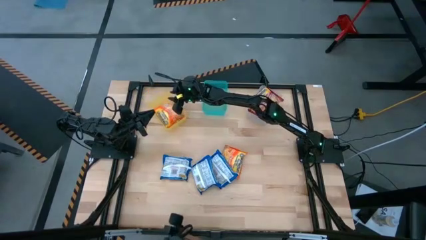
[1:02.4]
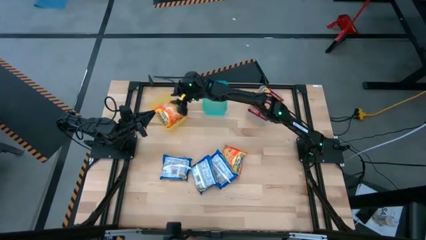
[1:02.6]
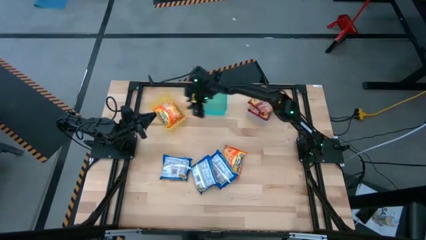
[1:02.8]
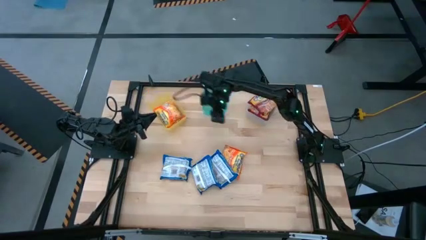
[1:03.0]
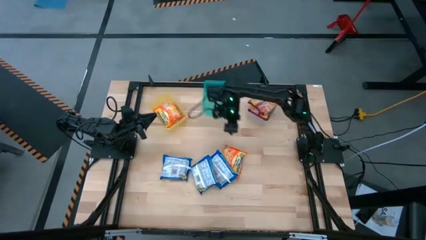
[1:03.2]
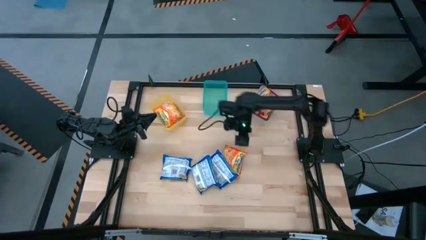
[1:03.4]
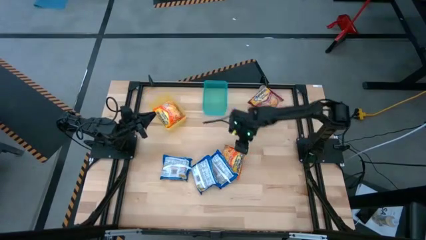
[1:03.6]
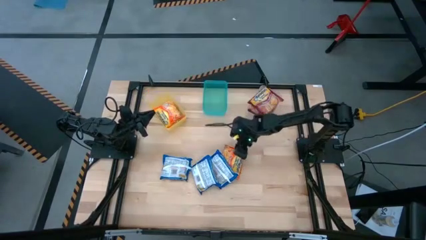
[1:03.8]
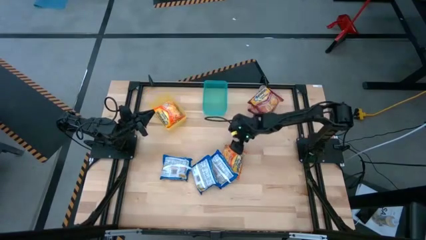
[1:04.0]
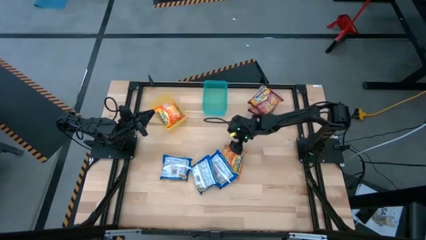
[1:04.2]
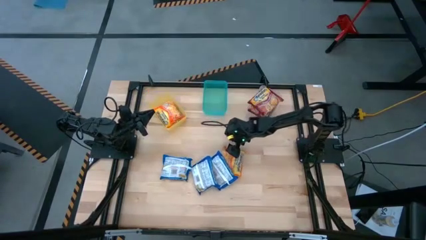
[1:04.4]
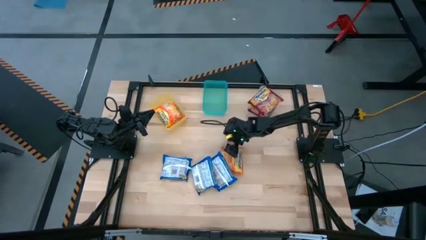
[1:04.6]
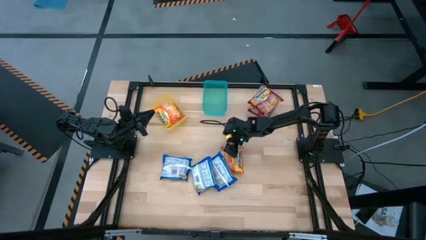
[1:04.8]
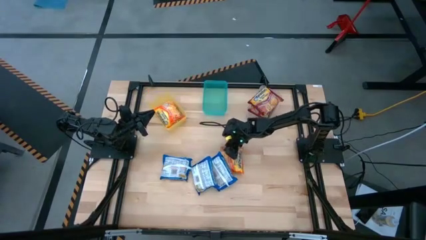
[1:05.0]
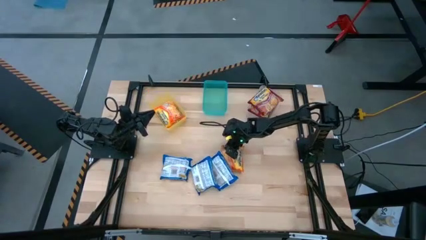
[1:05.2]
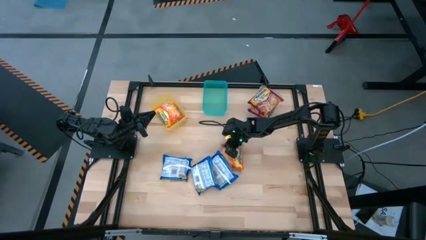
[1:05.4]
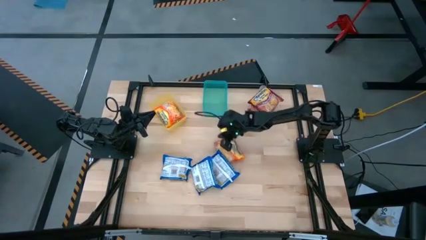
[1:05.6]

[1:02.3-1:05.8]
Task: Sort Maruchan noodles
Put the orange noodle pack into the yellow bin

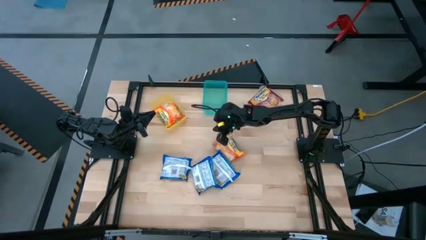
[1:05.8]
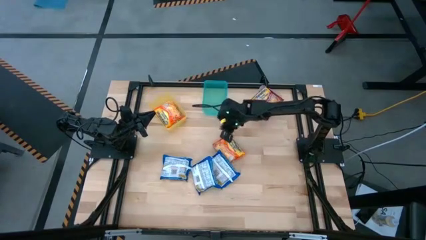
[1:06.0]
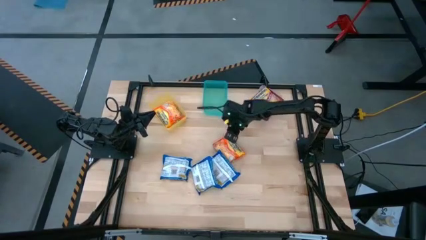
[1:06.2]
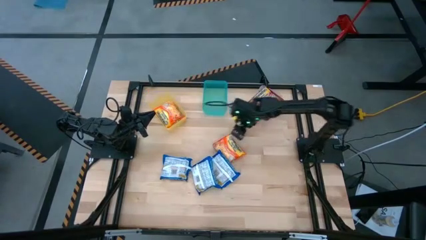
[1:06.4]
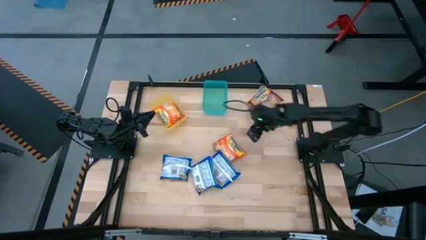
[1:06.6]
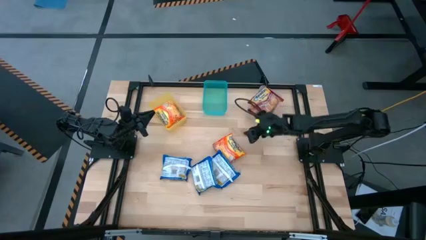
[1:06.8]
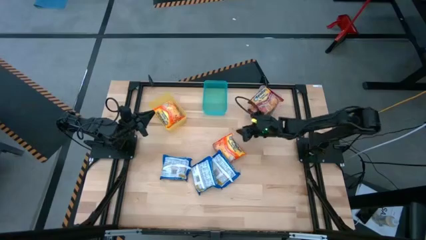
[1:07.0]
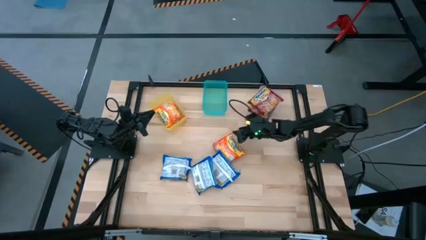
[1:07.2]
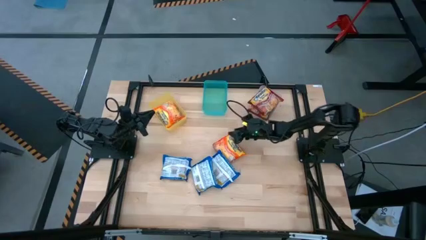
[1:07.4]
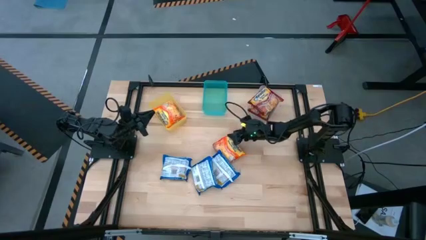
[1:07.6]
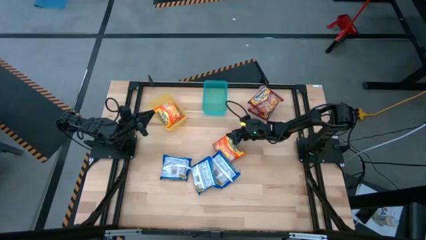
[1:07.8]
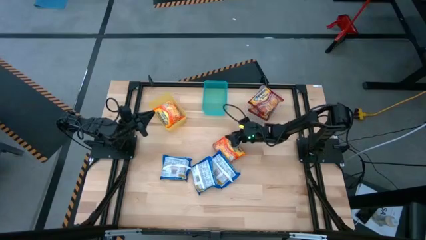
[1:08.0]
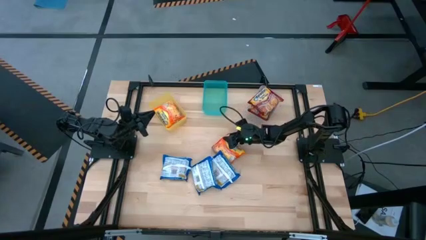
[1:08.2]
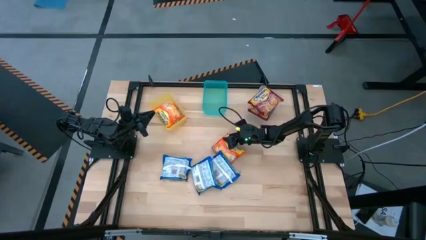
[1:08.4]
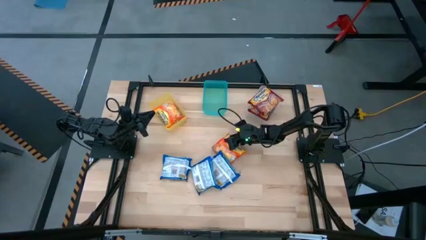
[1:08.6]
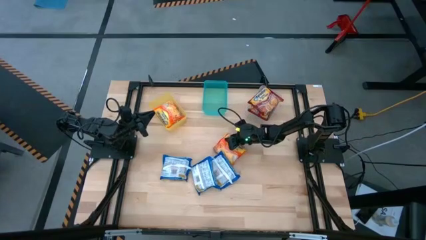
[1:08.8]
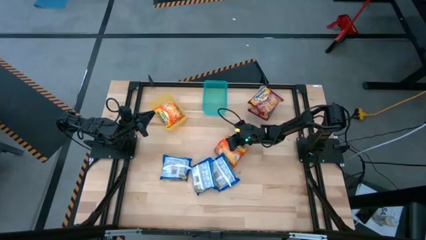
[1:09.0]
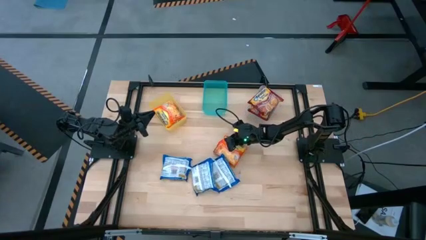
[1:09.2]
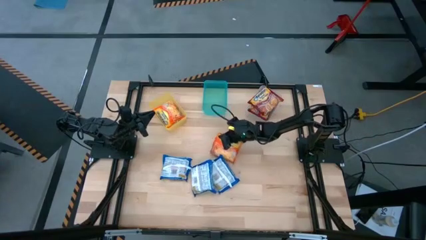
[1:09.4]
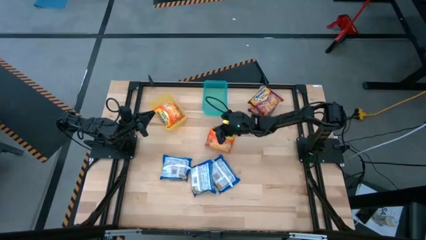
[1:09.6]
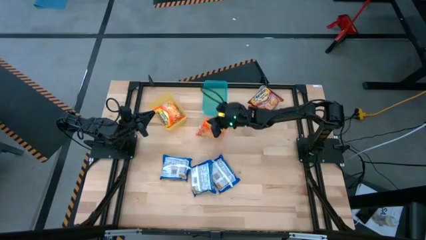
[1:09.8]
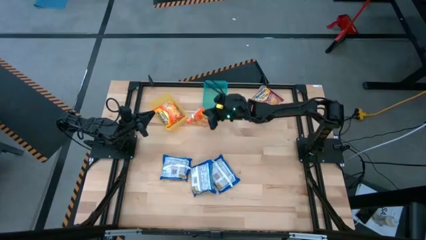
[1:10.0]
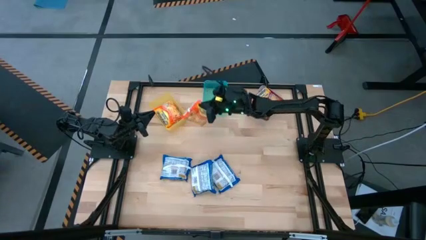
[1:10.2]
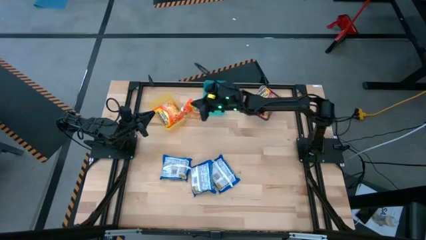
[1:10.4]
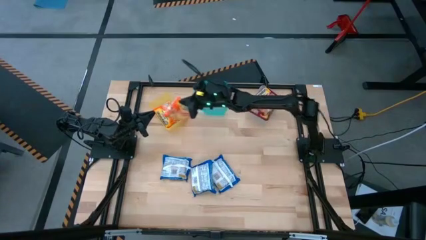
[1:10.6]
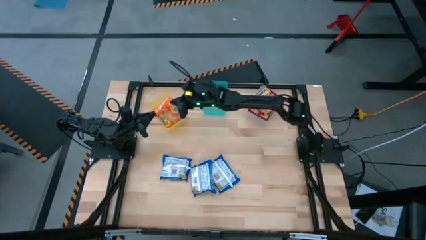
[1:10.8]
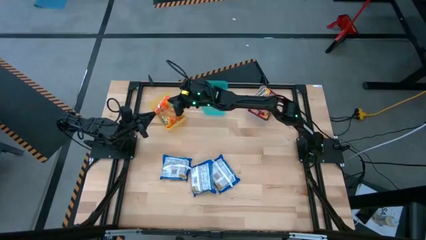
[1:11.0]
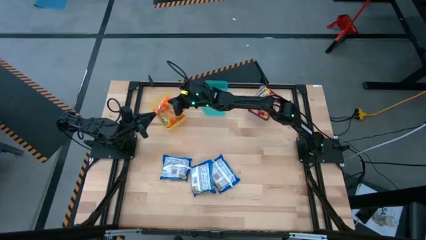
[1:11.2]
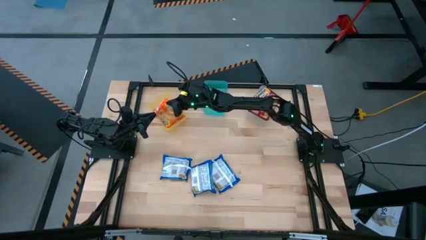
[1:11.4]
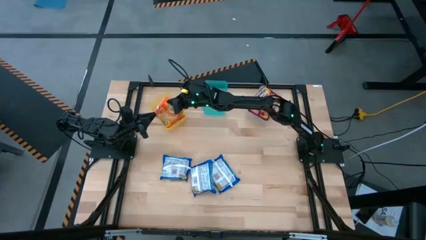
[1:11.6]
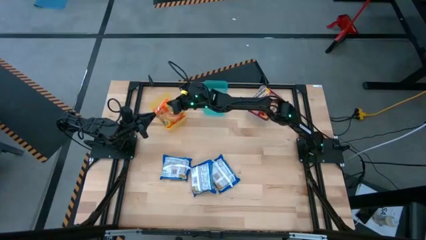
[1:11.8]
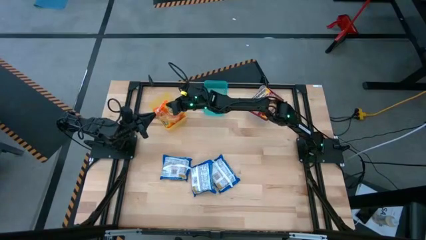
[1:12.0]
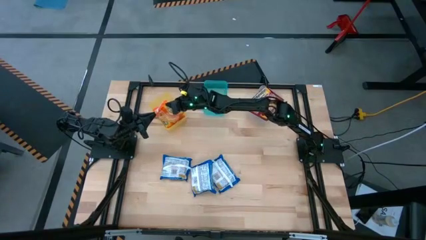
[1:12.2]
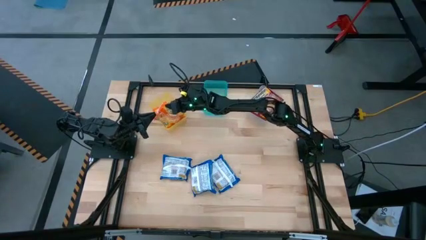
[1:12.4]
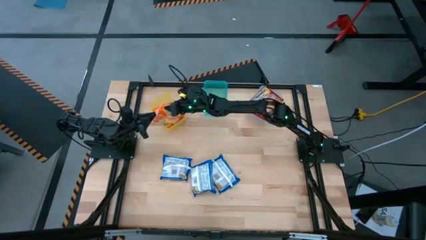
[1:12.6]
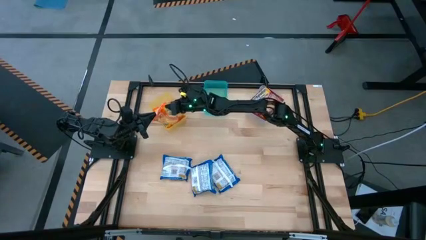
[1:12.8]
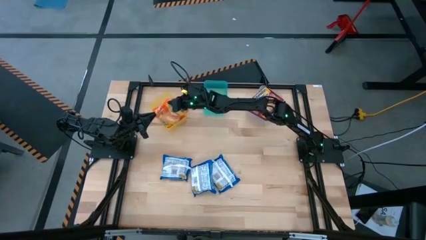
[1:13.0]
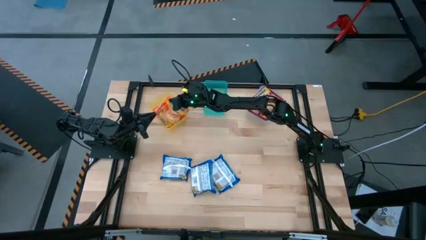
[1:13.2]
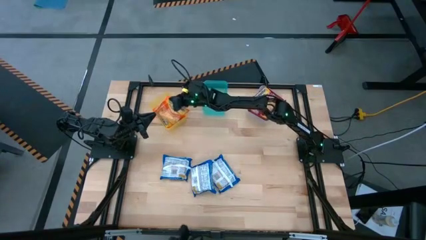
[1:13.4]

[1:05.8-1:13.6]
Put the orange noodle pack into the yellow bin

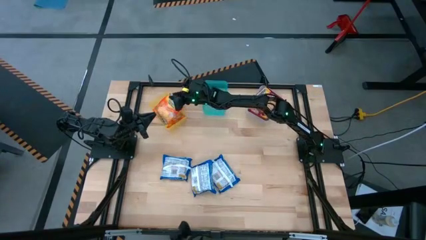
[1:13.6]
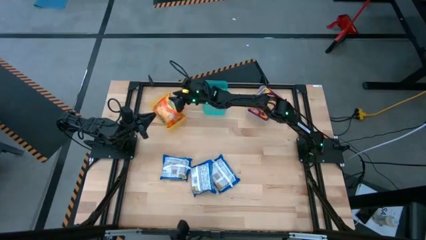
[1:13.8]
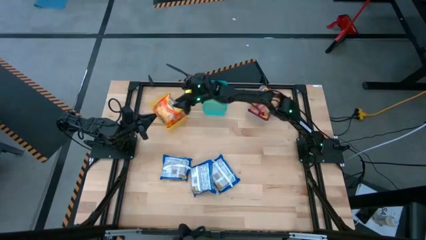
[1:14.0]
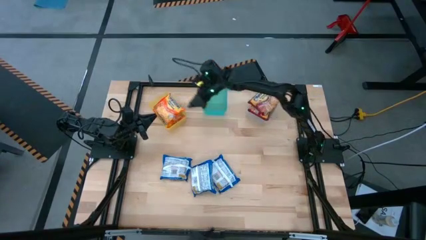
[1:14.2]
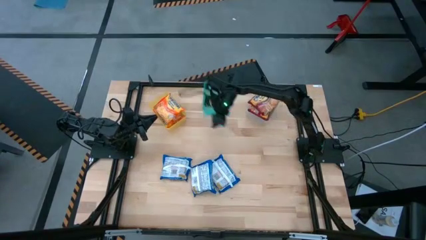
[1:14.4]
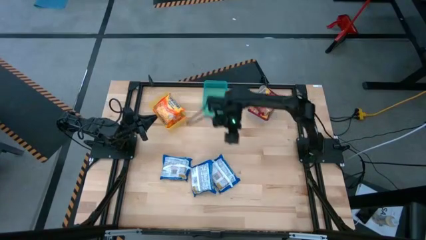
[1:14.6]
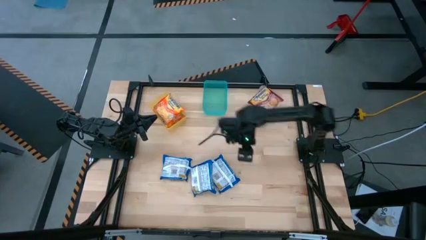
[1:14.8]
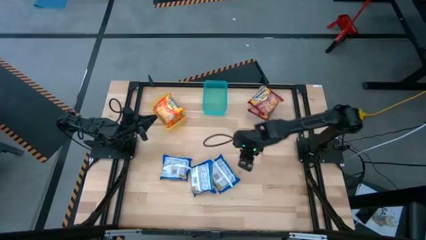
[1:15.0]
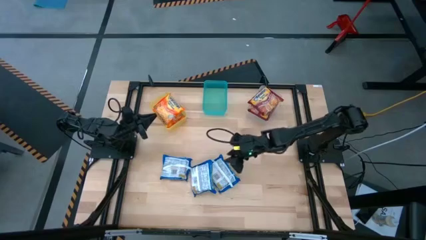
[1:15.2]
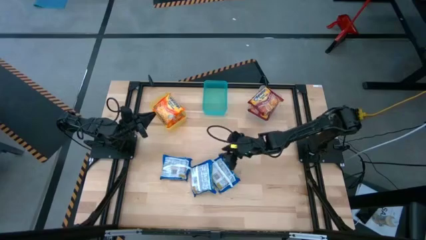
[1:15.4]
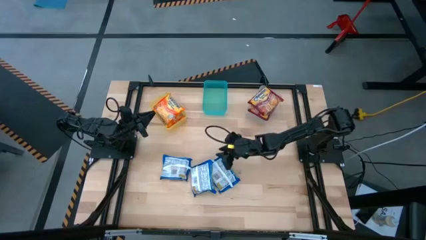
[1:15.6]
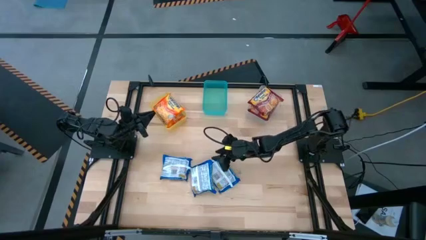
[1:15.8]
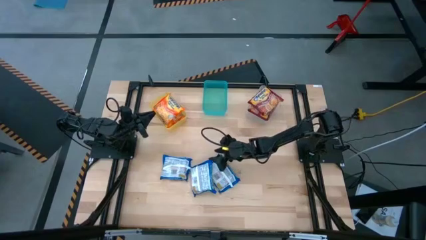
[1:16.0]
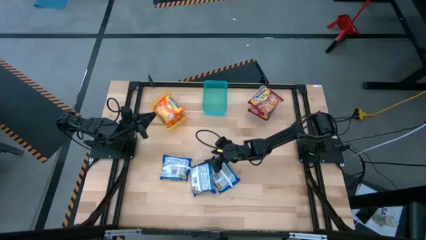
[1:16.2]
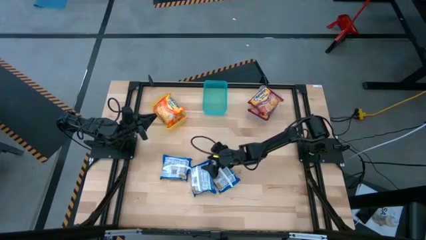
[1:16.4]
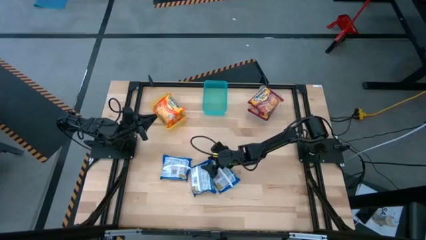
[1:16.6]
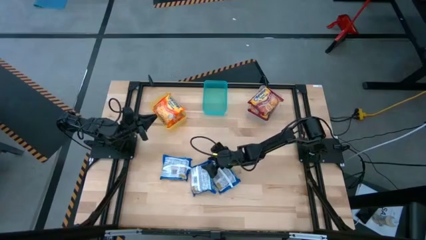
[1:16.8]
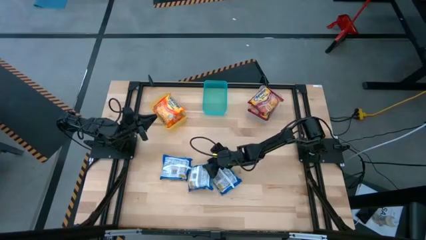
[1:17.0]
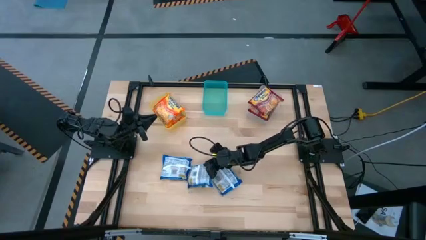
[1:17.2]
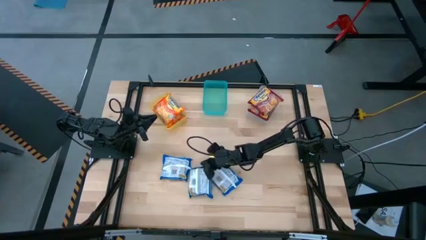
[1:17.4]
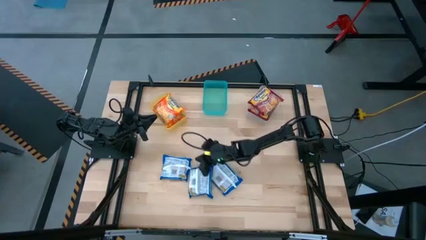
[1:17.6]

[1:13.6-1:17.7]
Put the middle blue noodle pack into the green bin
